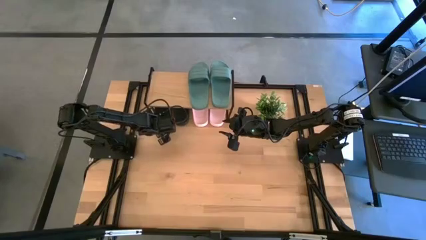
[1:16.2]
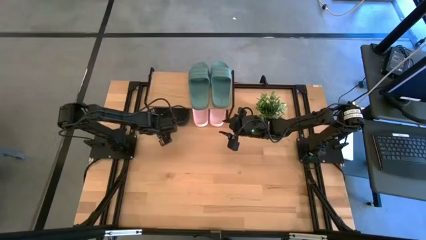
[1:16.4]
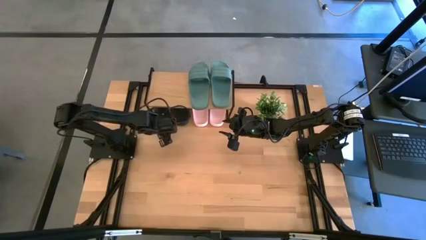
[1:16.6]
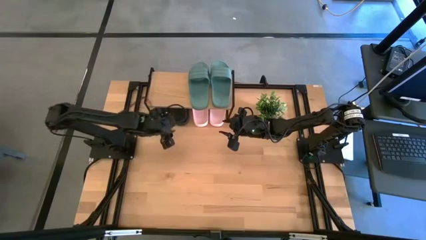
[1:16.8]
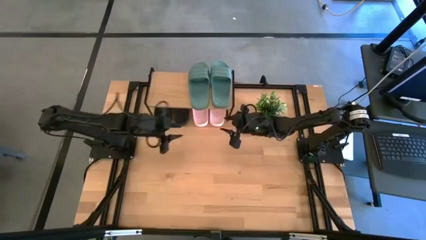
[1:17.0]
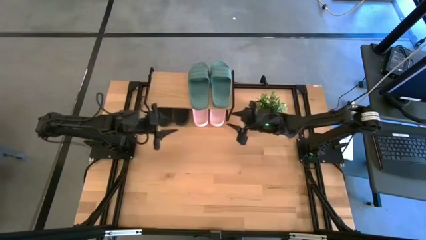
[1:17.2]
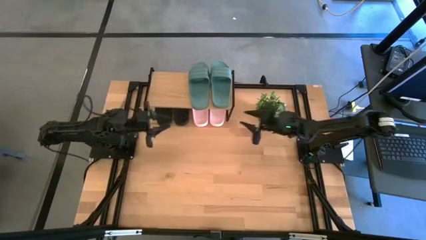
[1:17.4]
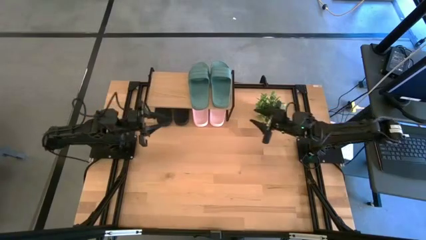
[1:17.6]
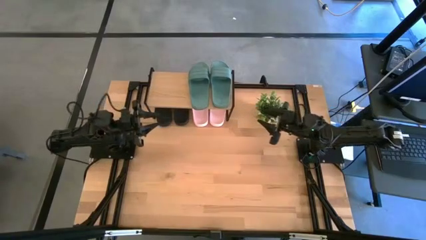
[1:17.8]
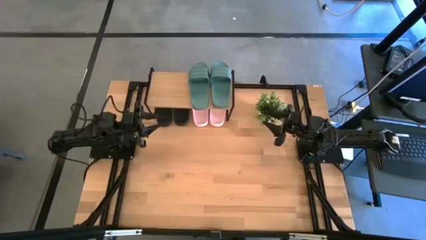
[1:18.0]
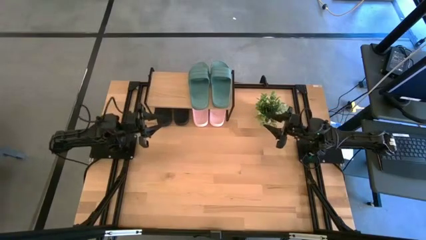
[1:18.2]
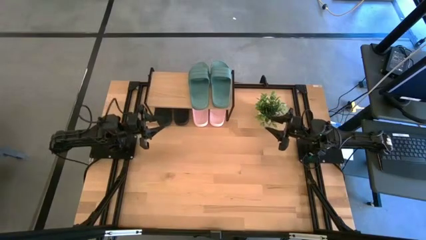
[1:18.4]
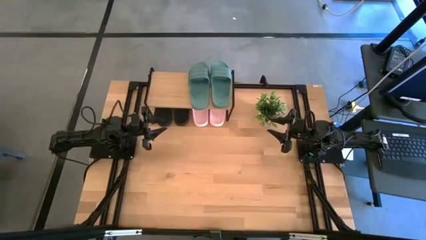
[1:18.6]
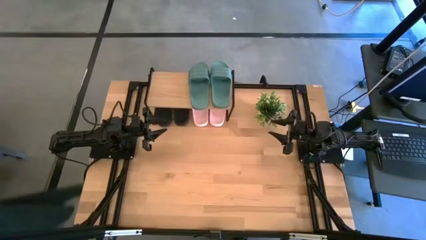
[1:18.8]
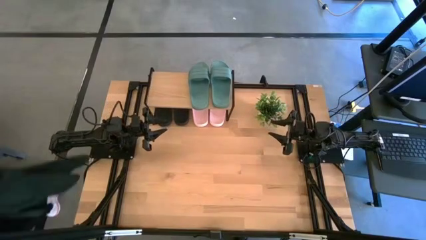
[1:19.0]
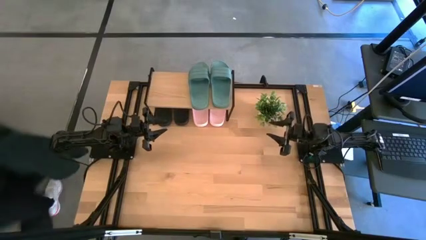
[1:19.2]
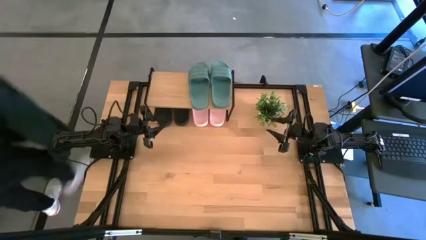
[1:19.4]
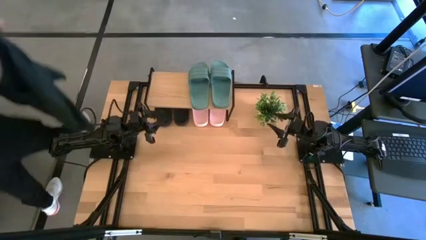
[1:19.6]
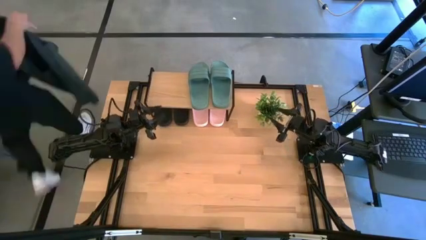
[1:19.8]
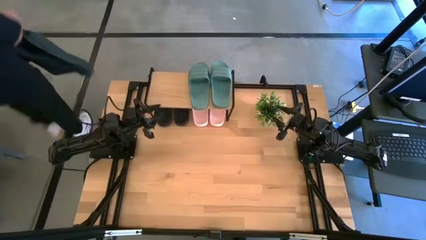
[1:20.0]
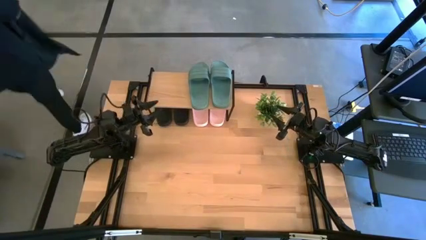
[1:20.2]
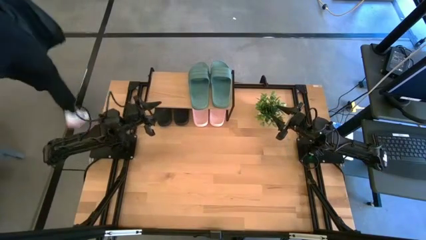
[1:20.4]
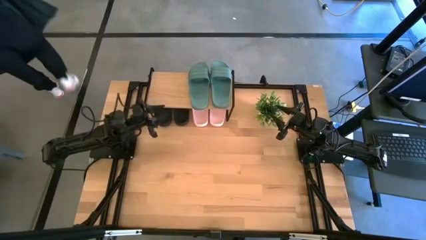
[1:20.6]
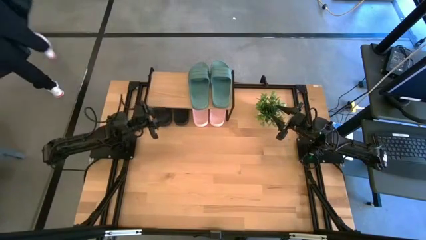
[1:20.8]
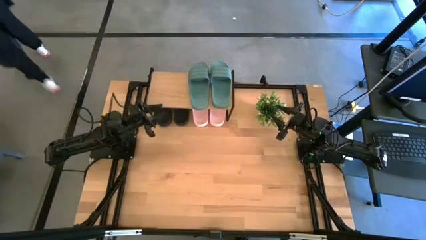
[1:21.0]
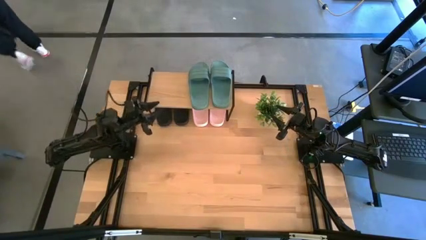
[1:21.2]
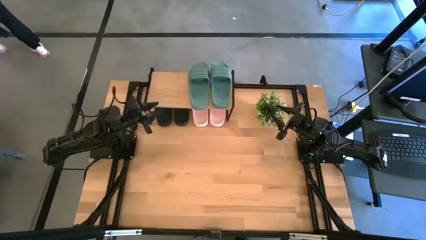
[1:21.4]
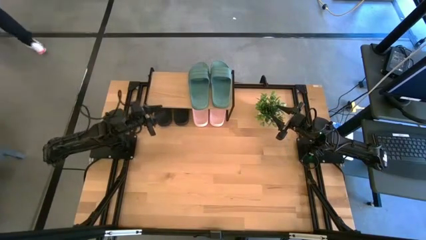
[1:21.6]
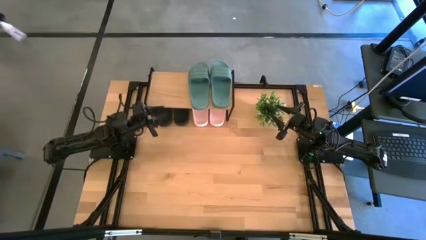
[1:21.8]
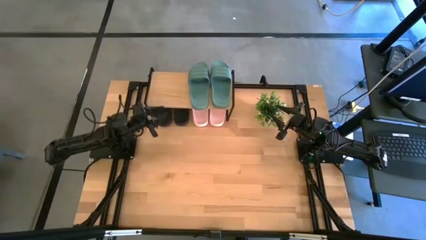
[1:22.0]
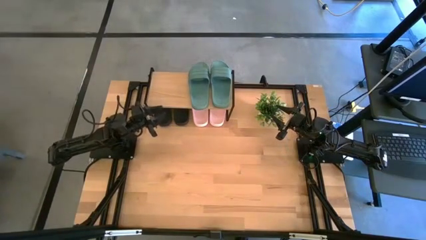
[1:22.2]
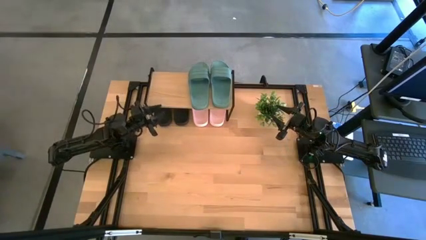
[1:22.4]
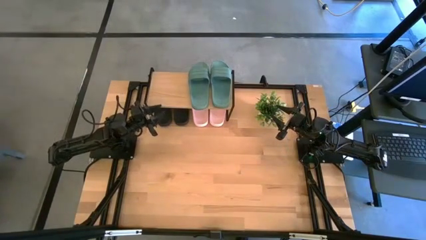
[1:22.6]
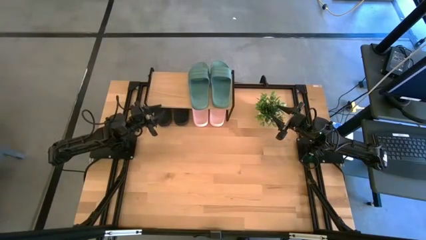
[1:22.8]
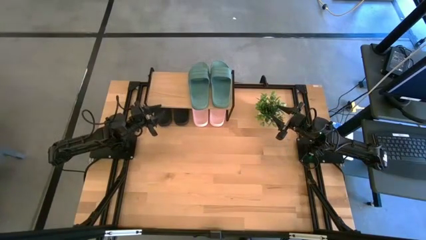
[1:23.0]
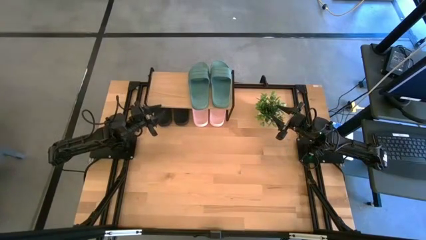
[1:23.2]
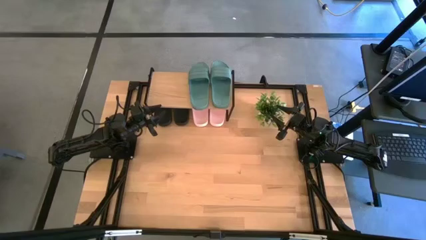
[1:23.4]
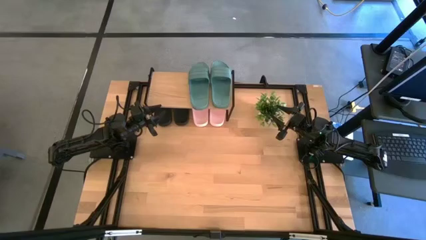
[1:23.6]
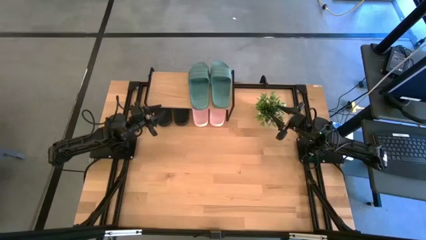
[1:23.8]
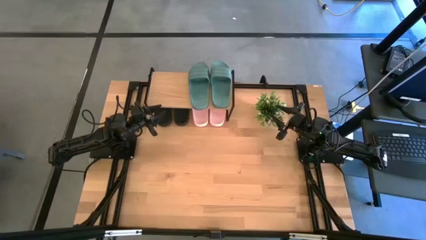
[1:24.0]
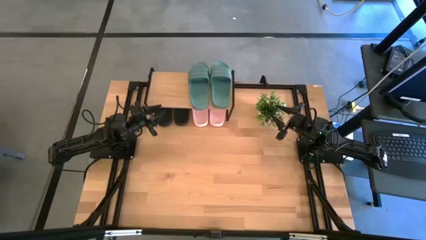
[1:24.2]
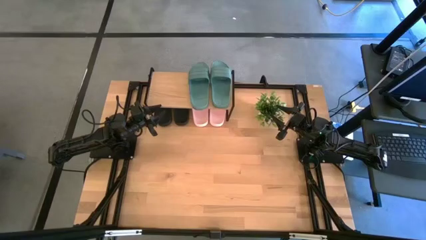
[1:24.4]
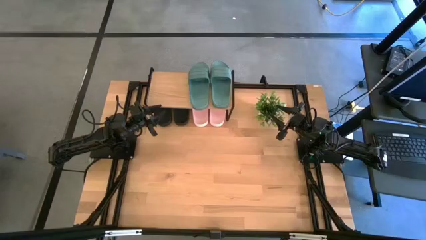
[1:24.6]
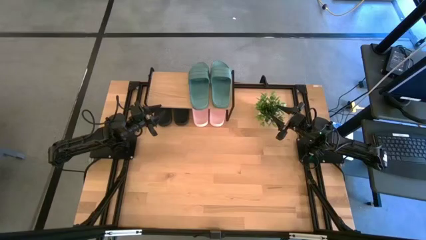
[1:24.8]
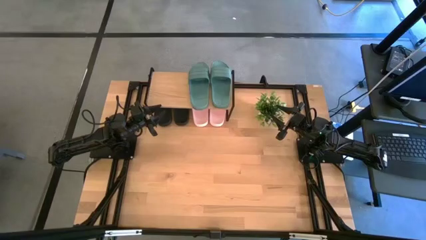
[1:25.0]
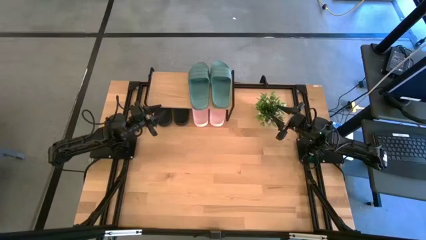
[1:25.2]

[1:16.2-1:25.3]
Task: Pick and place slides into the shelf
Return to Home Position

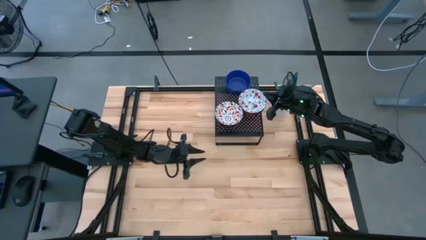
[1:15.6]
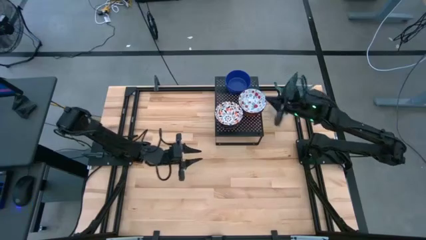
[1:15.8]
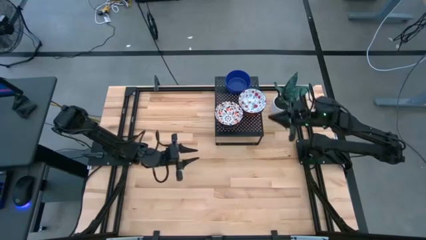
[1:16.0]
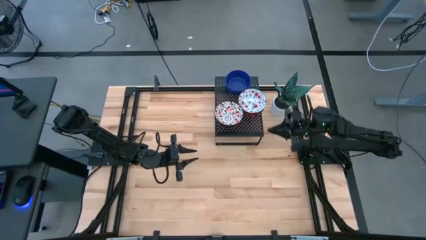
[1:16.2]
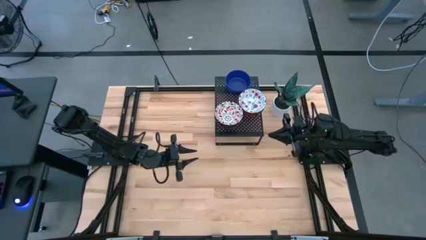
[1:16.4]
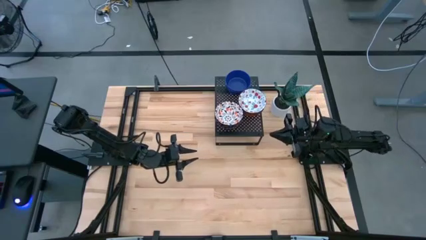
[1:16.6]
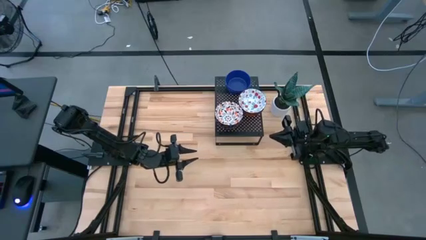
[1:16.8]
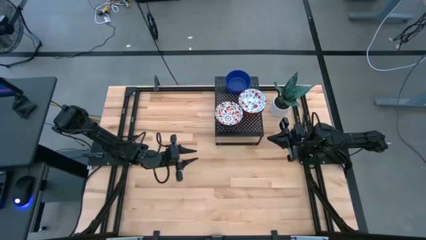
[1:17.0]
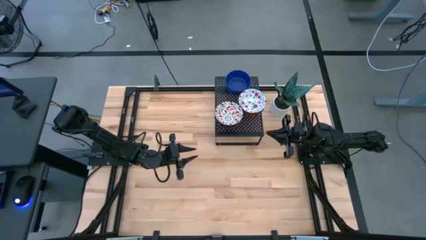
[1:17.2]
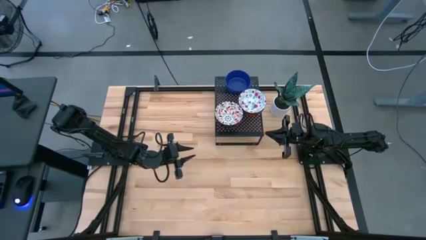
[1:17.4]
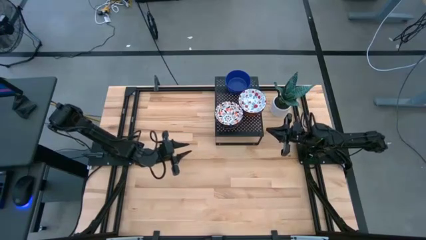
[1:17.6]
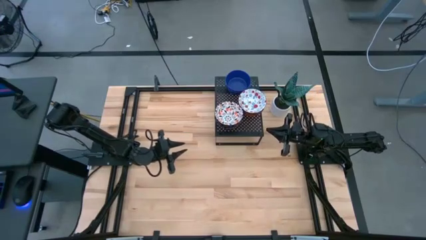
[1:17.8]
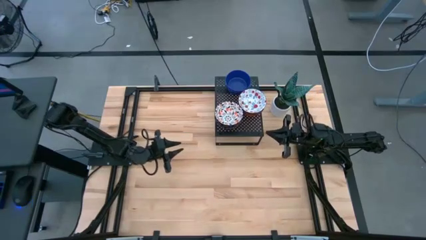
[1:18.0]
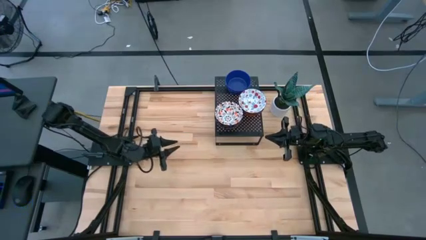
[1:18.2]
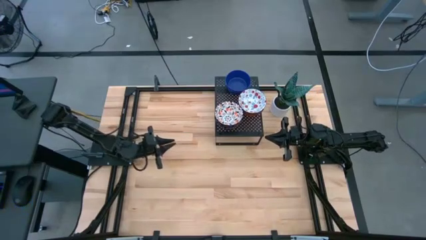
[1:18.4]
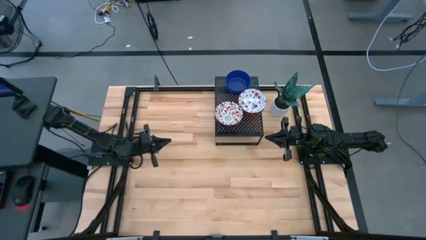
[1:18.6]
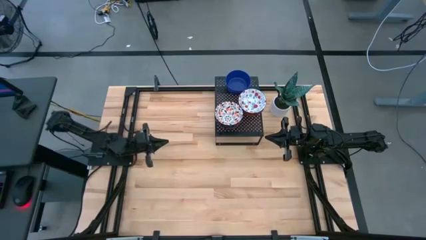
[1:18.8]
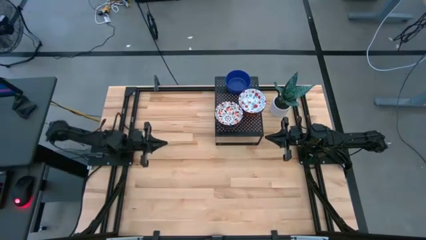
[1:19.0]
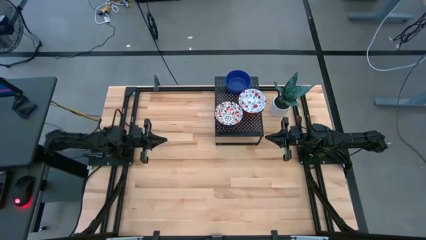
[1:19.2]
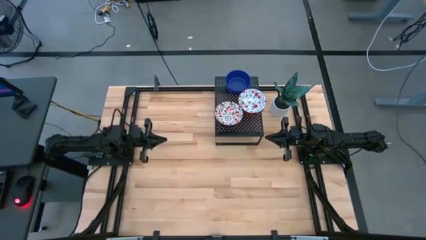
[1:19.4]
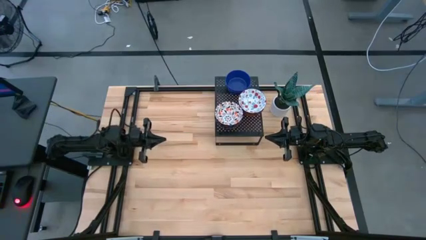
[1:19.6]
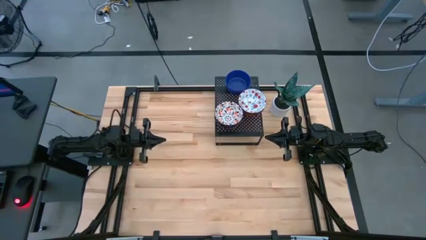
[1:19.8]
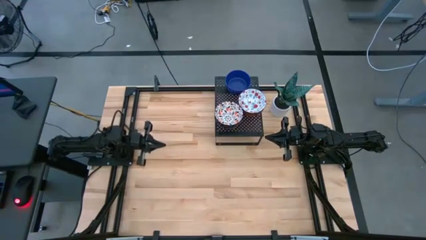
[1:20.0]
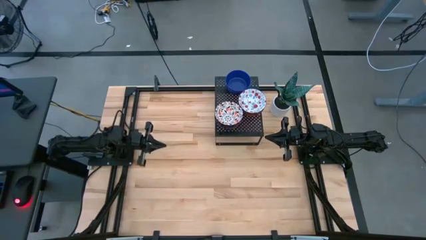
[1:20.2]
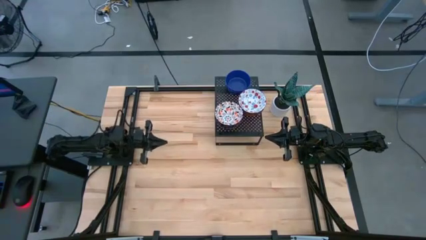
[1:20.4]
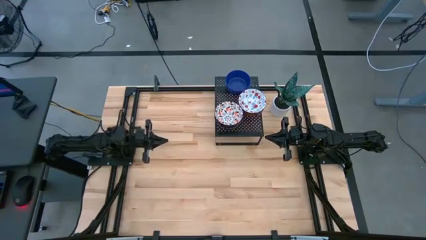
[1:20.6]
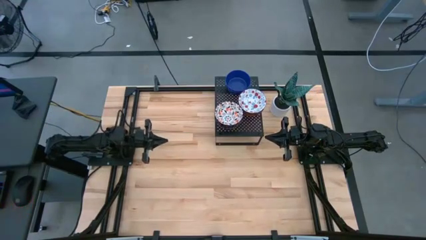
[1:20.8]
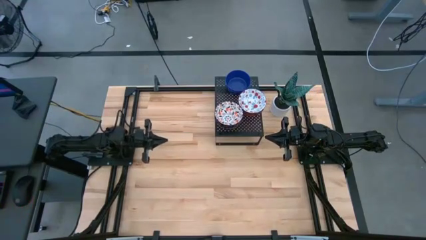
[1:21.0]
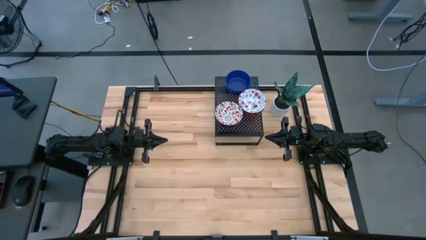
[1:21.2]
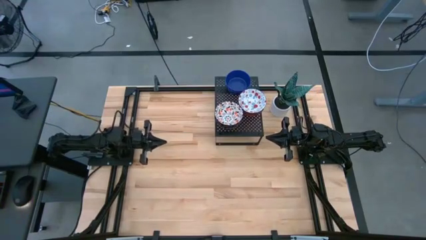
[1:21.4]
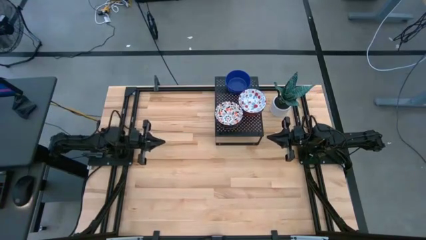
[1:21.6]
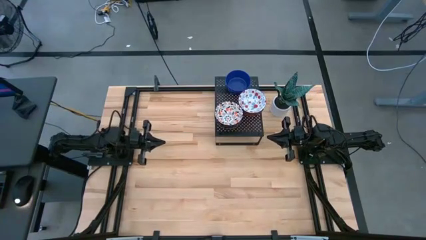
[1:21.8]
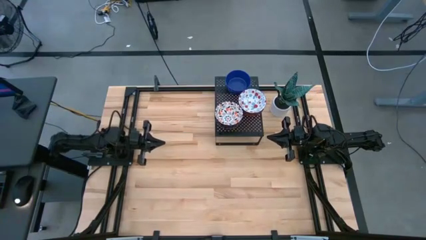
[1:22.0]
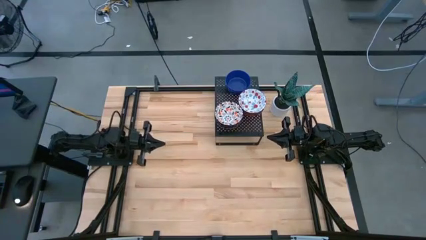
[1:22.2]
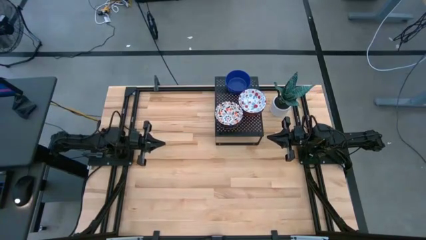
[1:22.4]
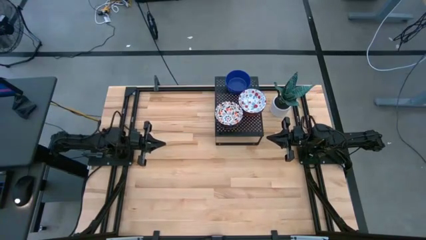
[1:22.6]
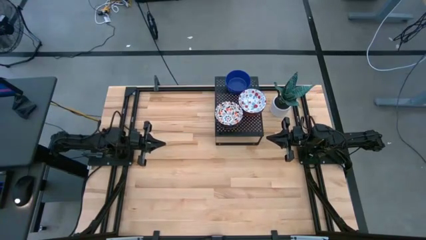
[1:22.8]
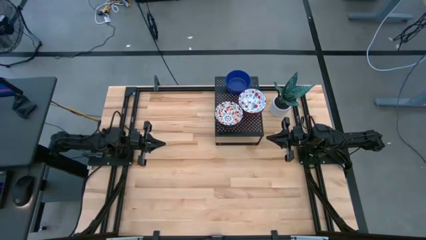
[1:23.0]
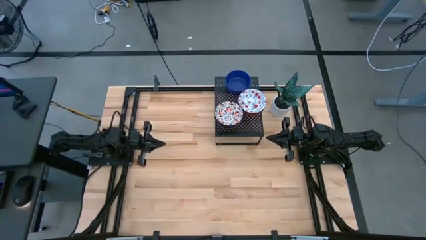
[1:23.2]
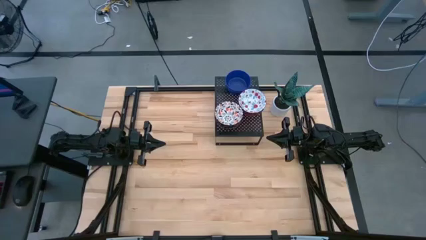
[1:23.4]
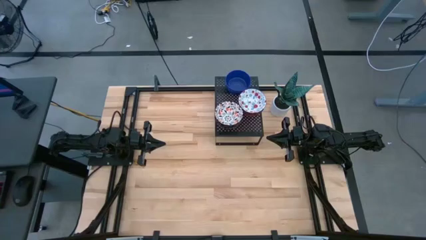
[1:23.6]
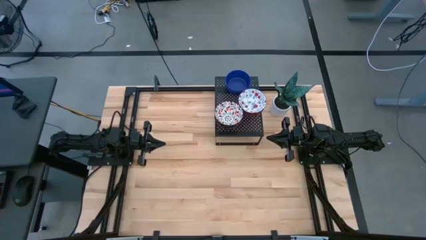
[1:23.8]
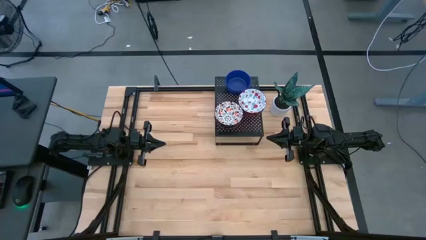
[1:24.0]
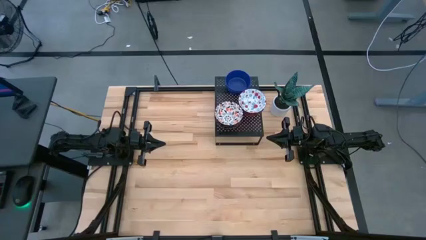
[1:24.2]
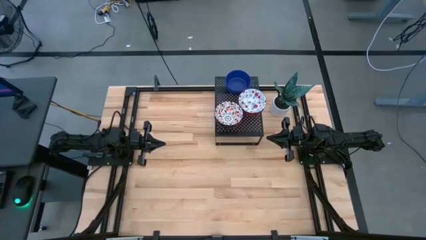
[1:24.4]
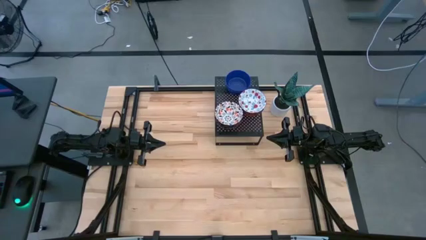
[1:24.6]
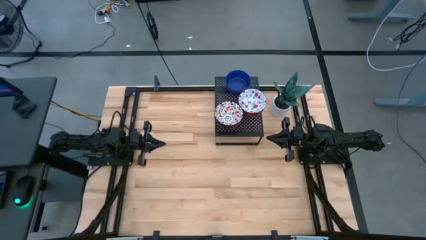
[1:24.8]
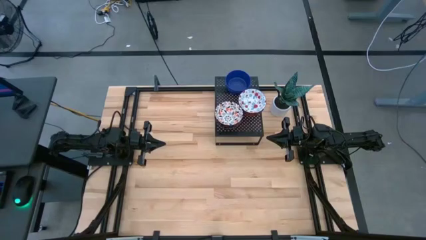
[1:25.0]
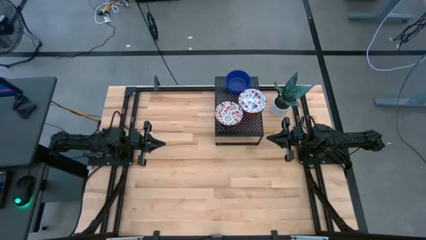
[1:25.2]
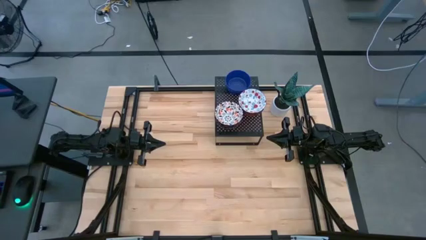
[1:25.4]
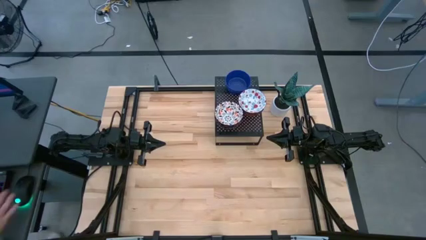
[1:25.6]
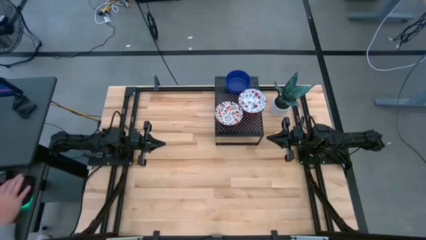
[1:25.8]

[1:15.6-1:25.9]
Task: Pick & Place Mini bowls
Return to Home Position
